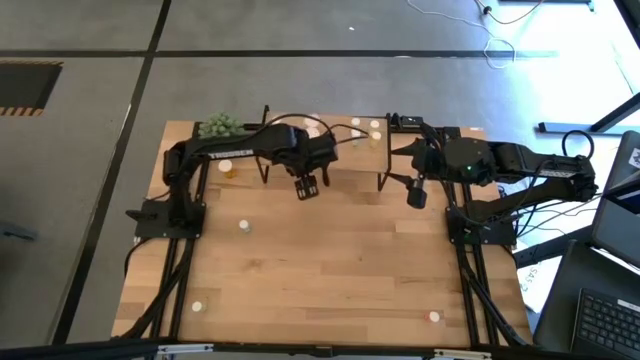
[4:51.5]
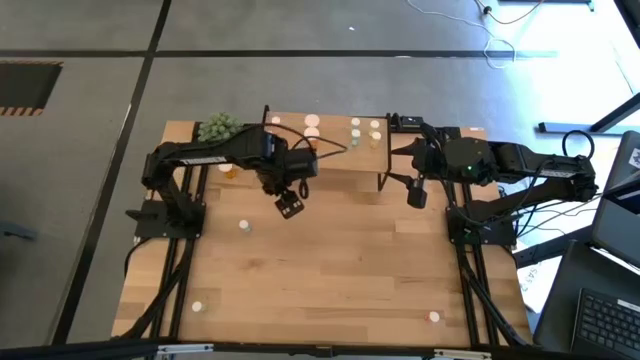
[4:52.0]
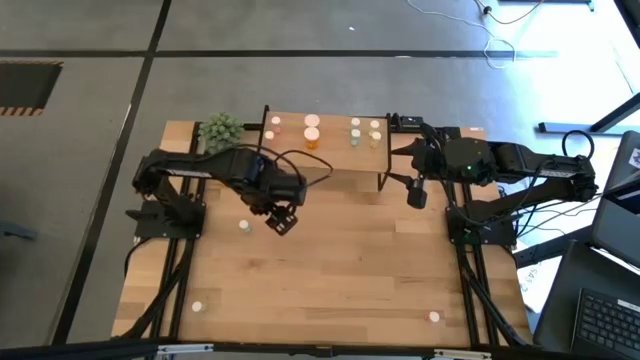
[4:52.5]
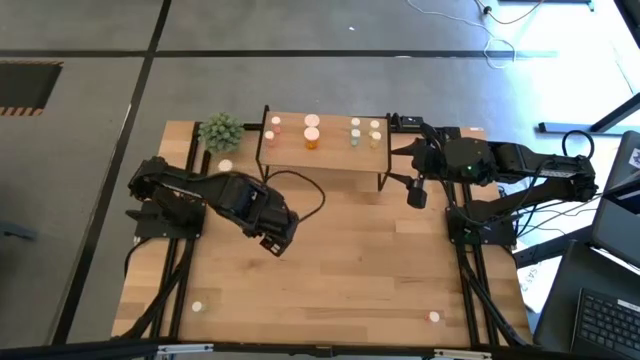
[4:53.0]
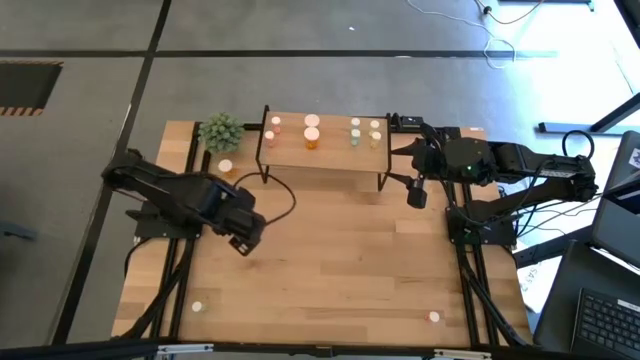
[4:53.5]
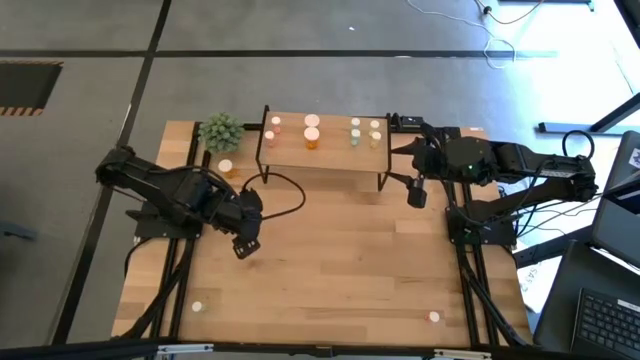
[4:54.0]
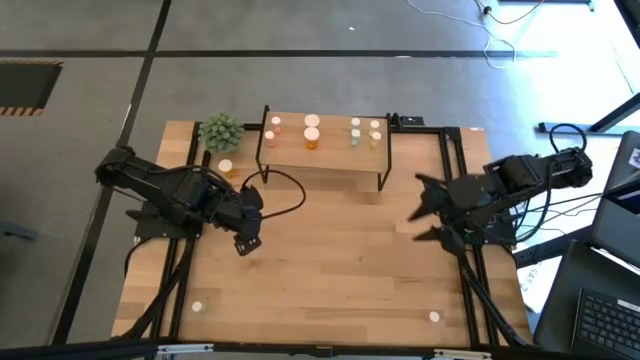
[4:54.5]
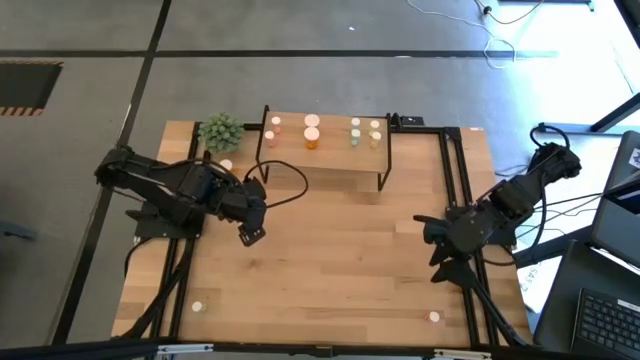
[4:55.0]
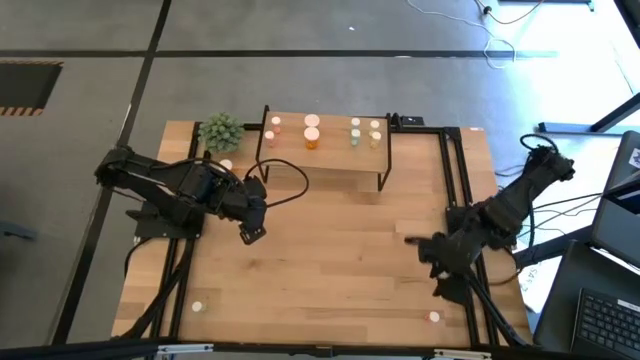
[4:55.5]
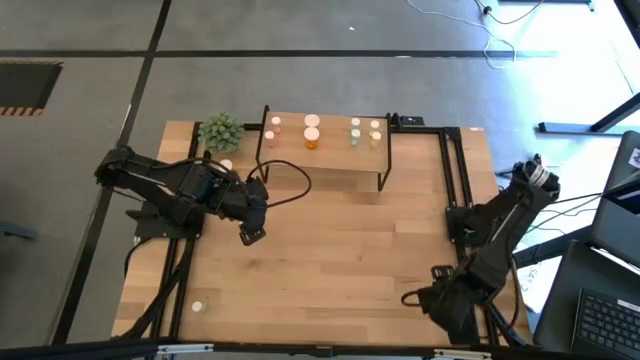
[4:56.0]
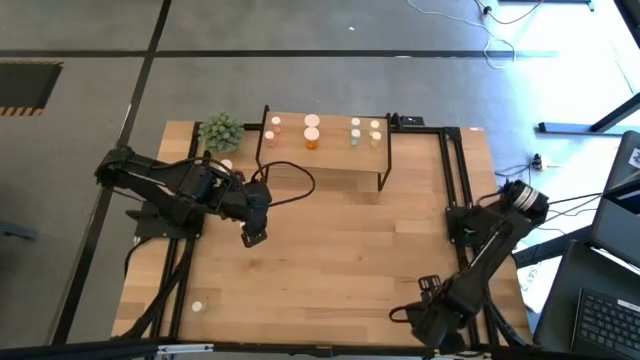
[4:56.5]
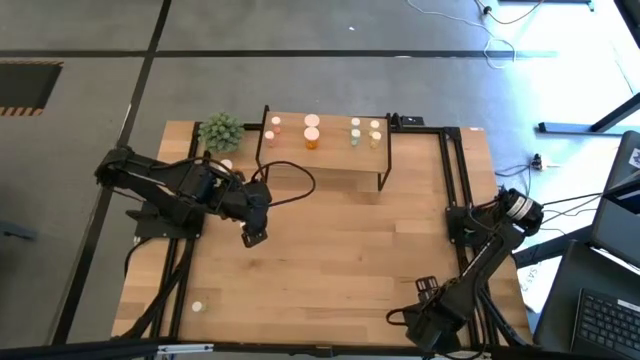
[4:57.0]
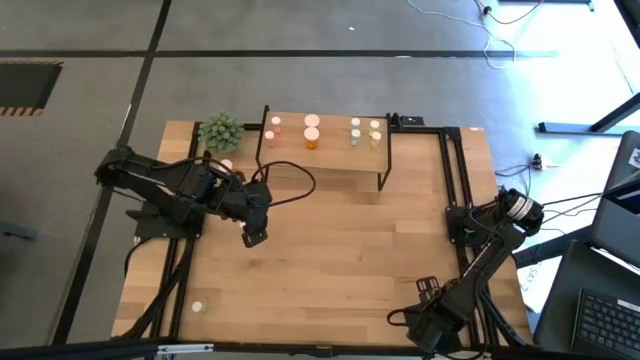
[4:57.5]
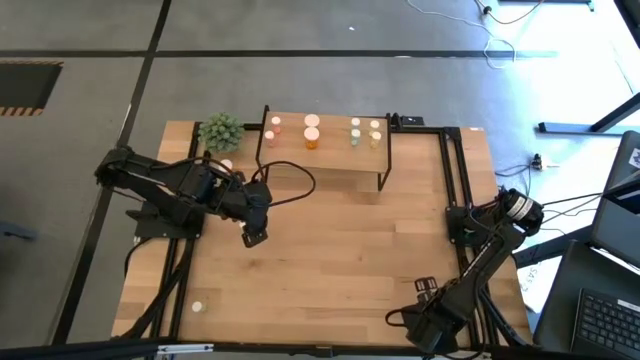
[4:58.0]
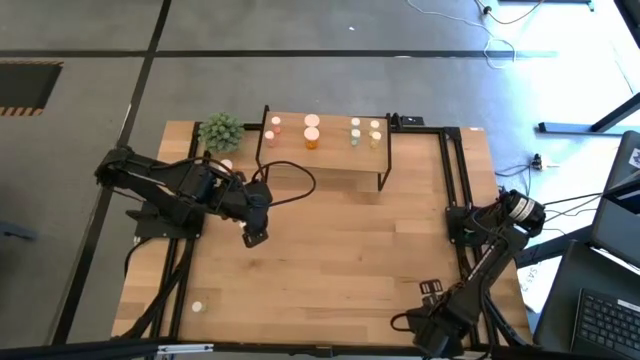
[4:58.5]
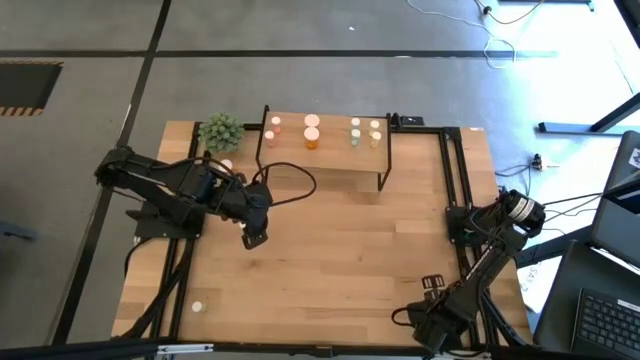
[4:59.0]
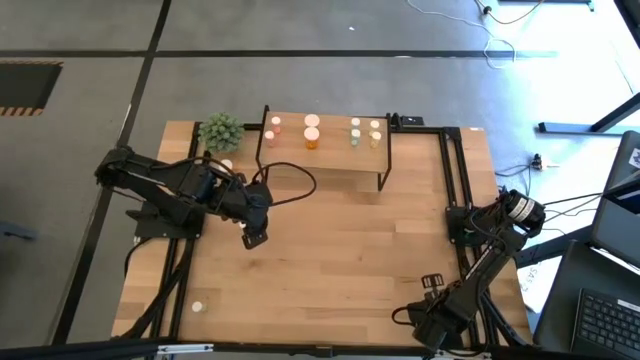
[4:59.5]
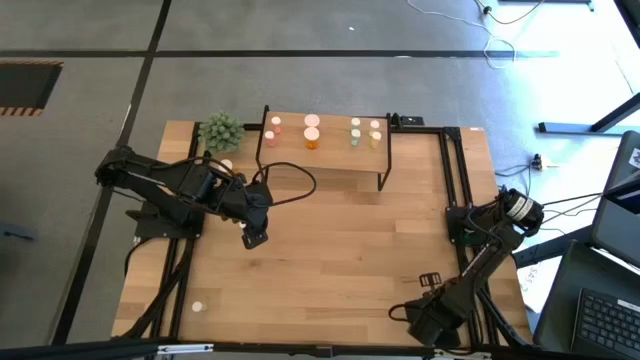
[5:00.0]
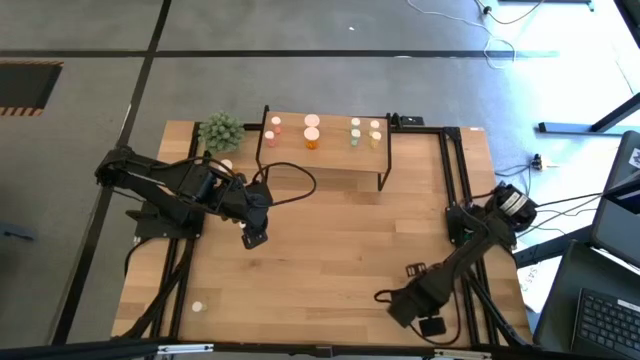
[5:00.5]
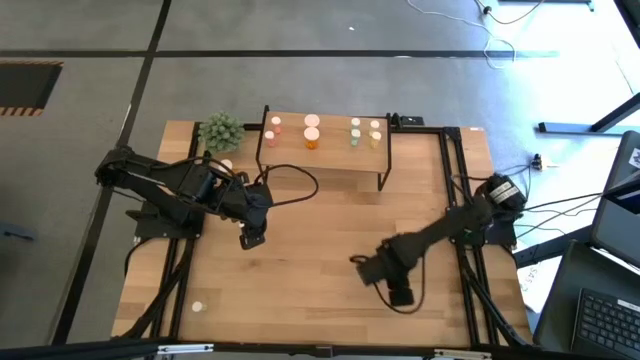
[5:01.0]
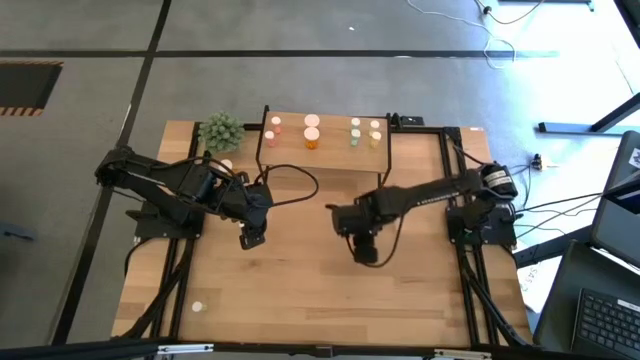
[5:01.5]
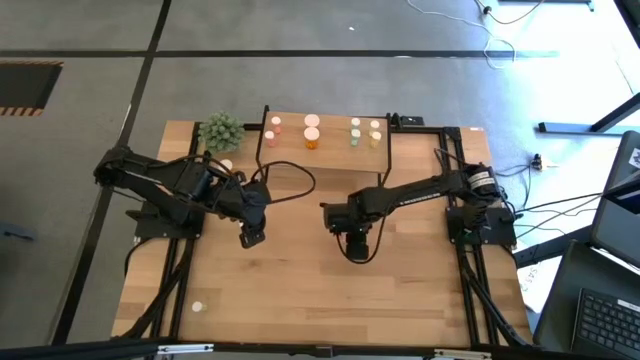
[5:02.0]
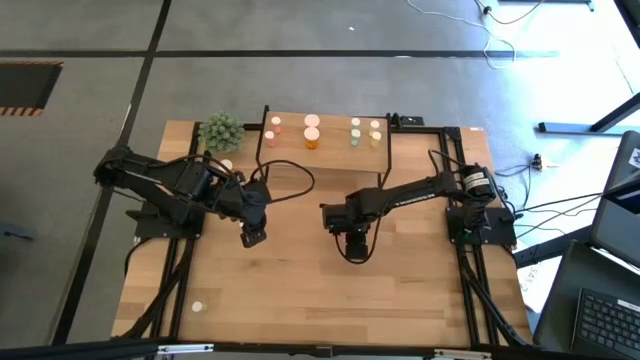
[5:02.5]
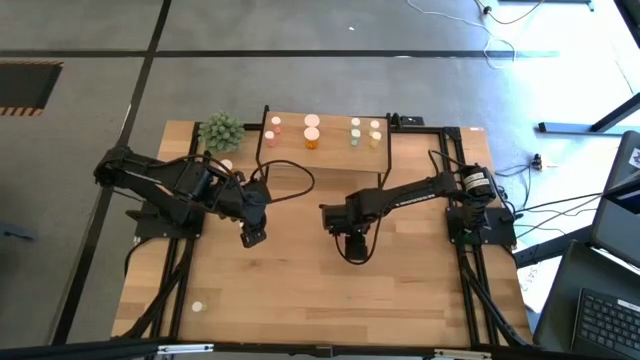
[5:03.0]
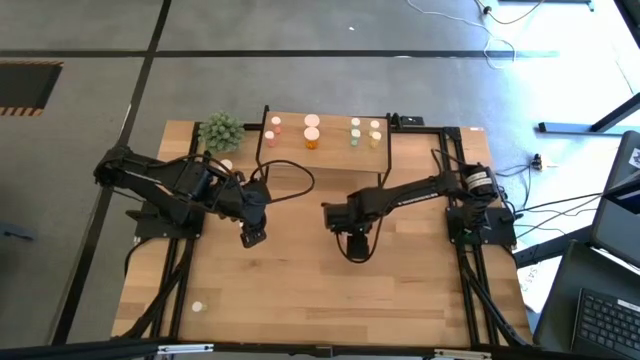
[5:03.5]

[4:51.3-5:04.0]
Task: Pick and place medicine bottles onto shelf by color
Put the red medicine bottle on the shelf, aligned with the other red medicine bottle

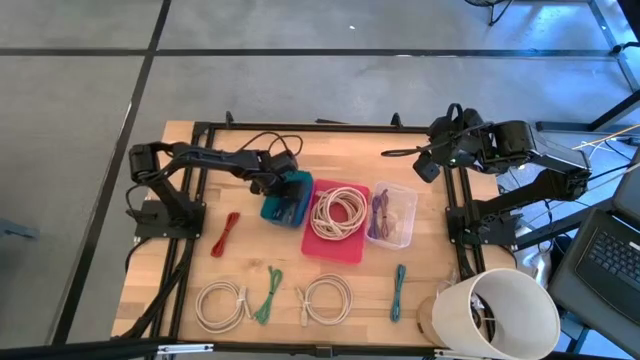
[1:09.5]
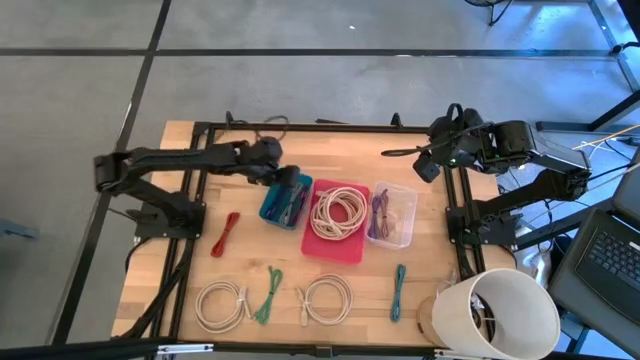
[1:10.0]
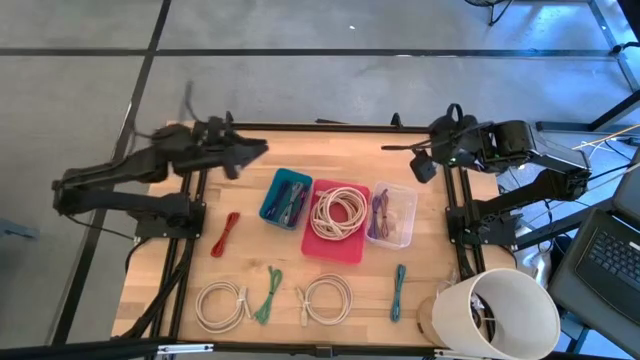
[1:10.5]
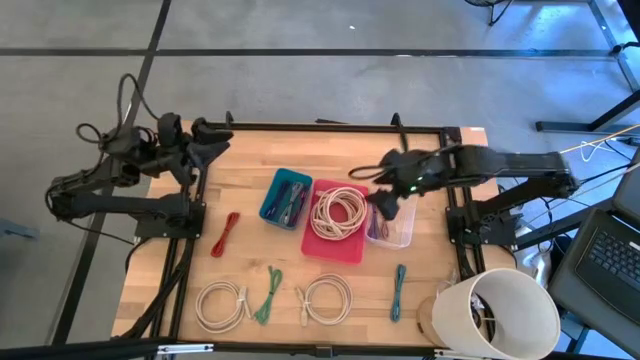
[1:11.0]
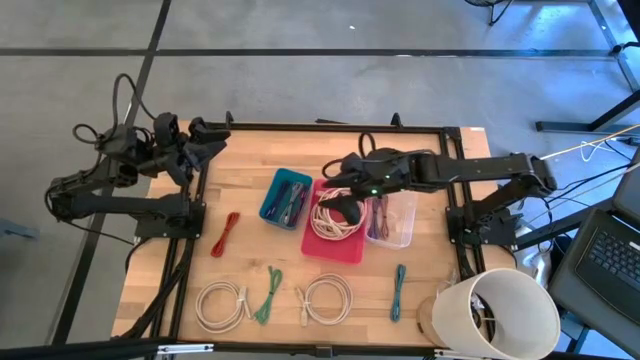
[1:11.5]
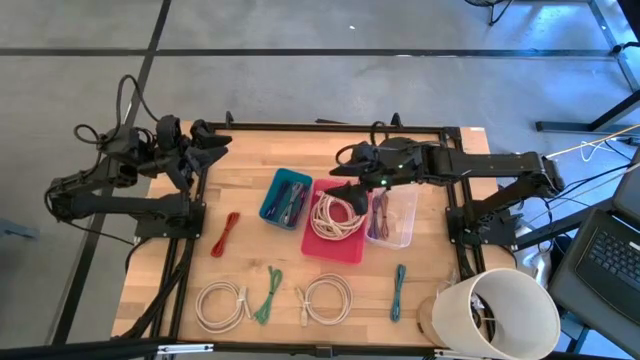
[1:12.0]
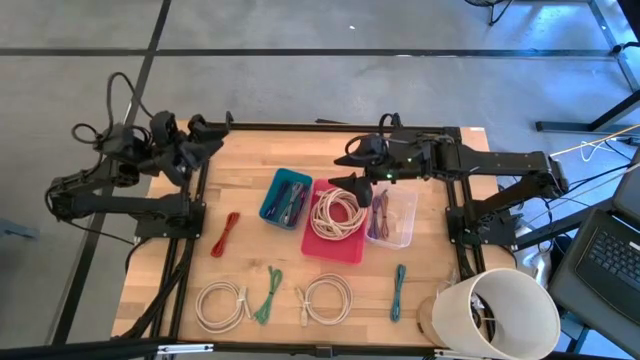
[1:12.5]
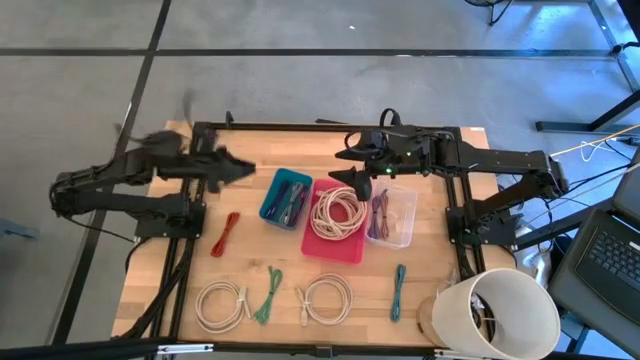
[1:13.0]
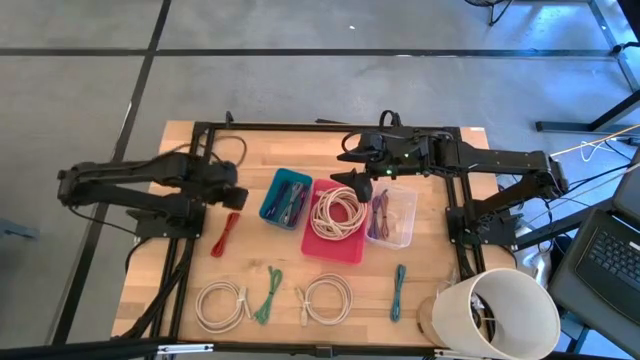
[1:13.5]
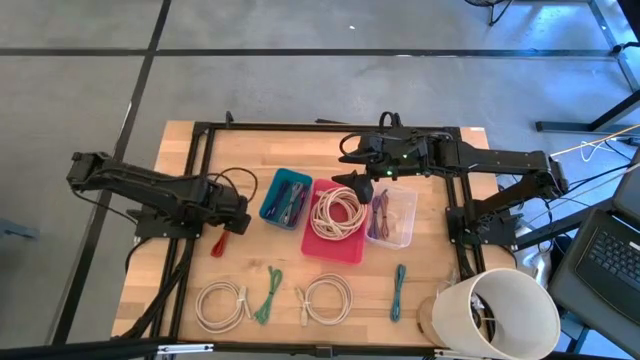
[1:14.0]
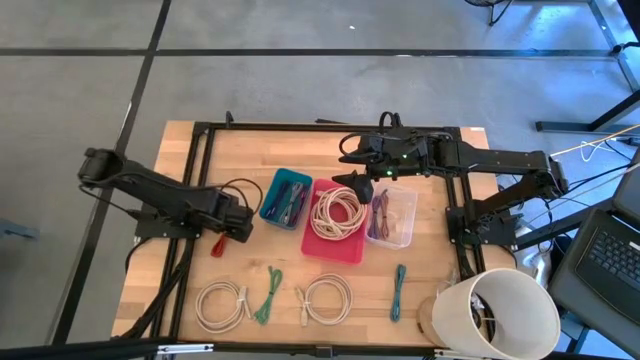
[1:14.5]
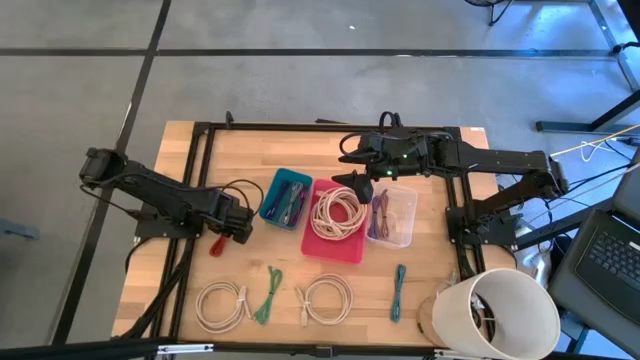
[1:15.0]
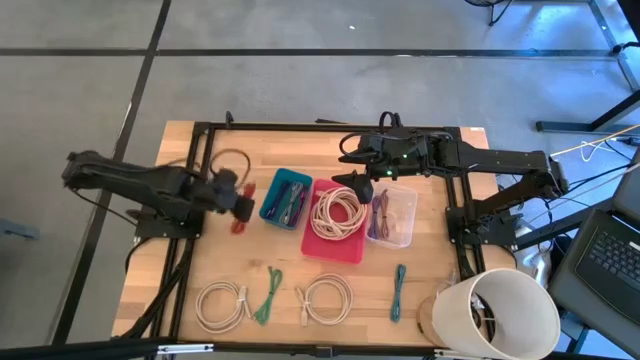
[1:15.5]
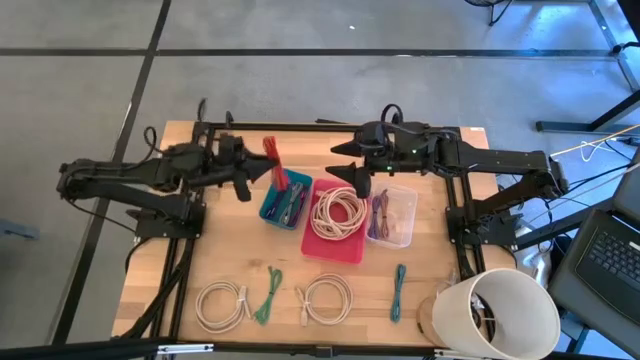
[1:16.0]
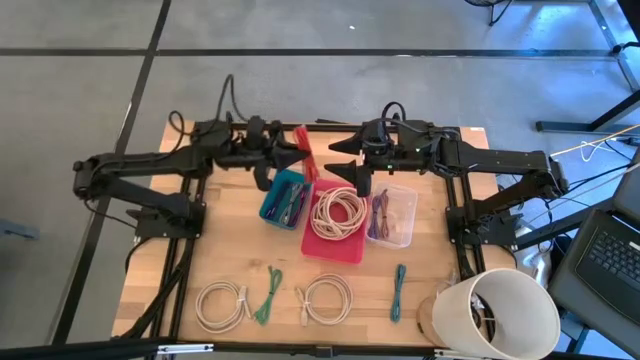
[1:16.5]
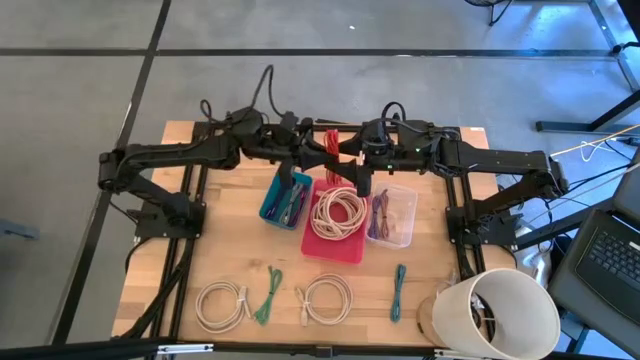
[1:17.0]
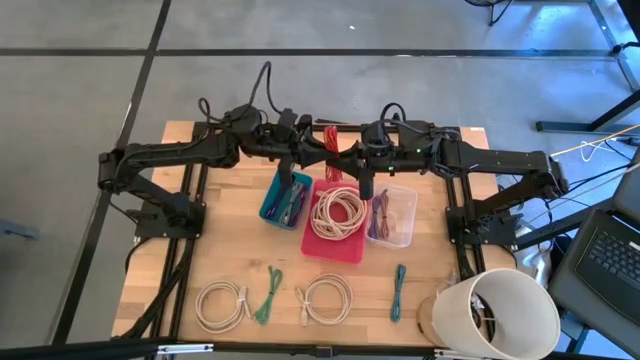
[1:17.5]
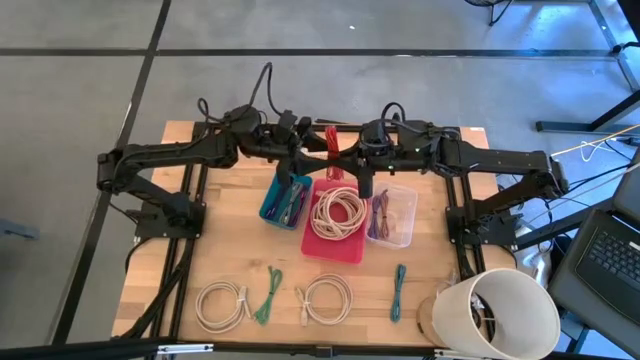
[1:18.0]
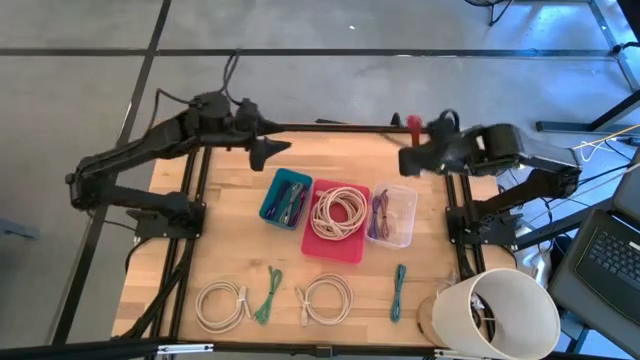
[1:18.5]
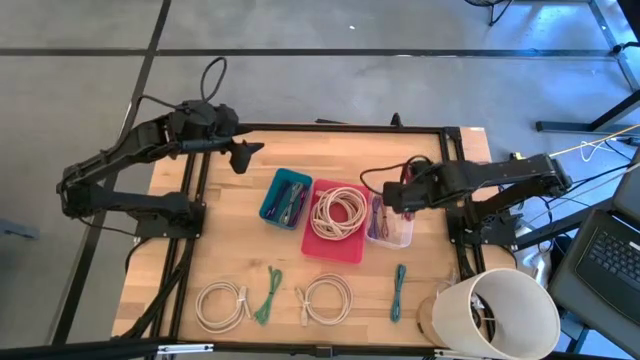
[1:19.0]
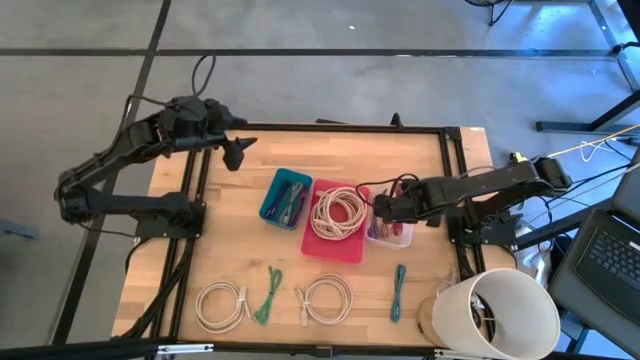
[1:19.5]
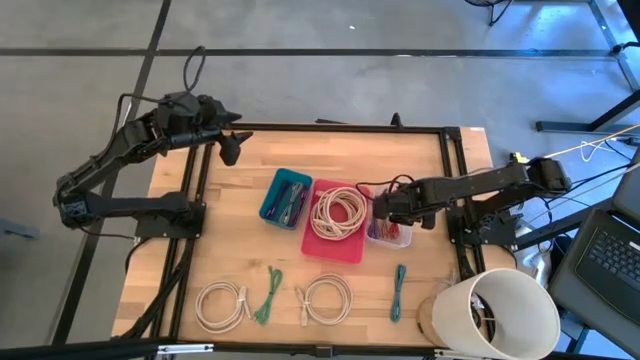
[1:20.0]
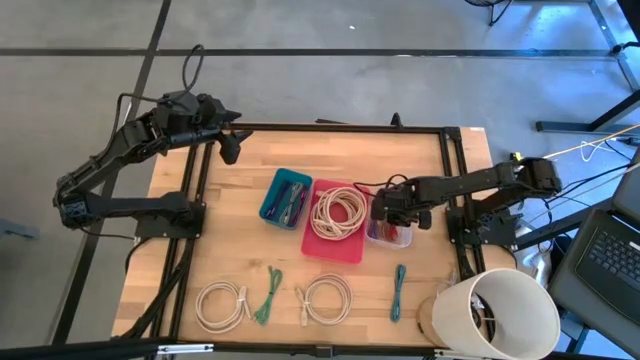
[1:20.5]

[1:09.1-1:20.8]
Task: Pick & Place USB Port
Put the orange charger cable into the transparent bin
